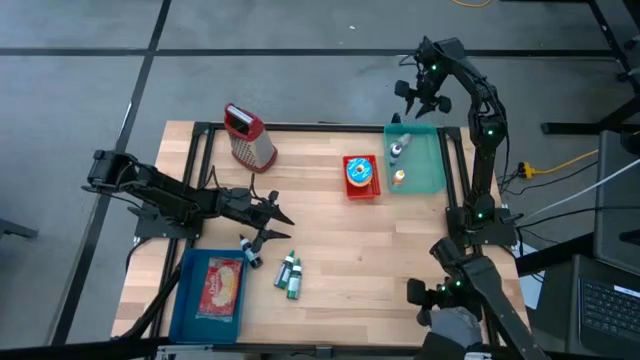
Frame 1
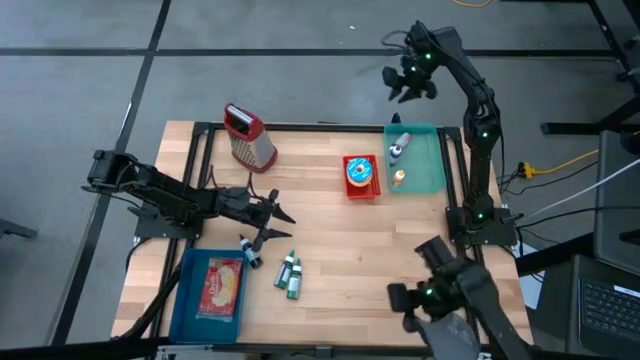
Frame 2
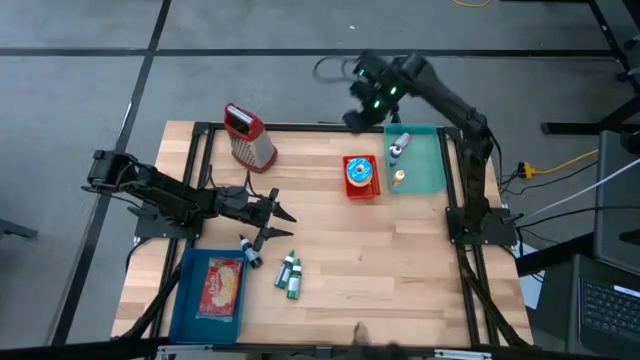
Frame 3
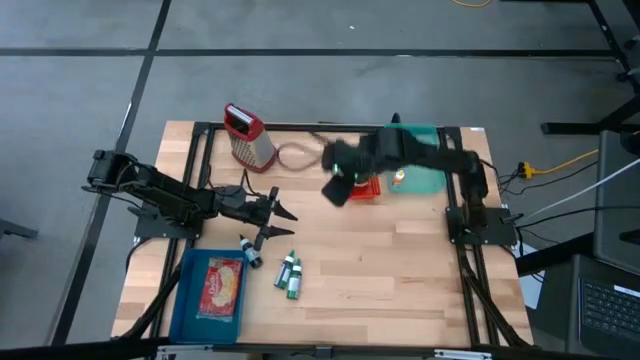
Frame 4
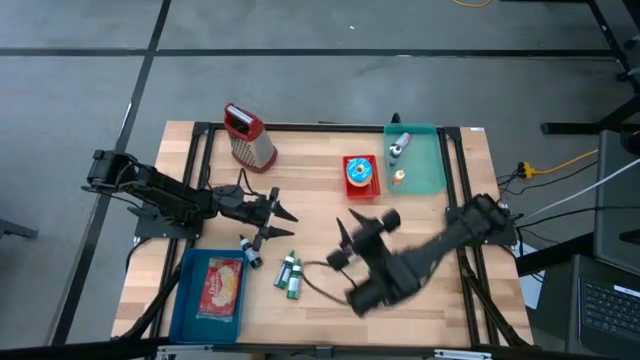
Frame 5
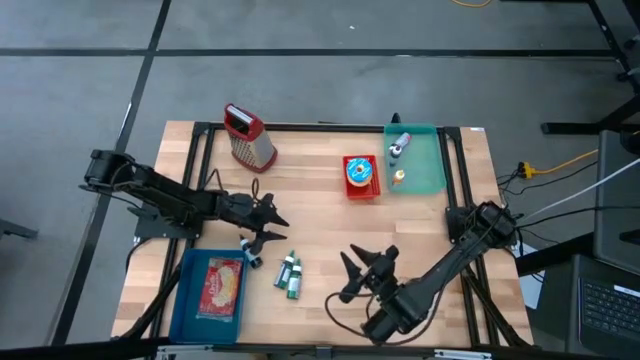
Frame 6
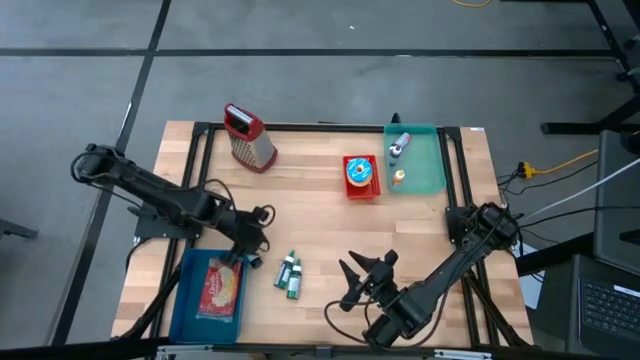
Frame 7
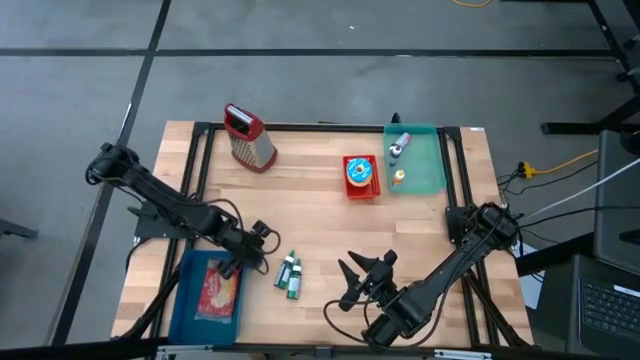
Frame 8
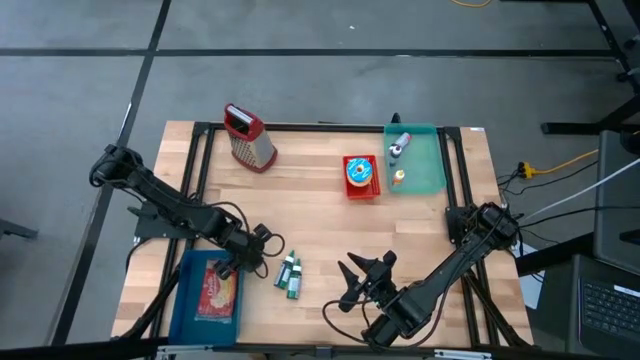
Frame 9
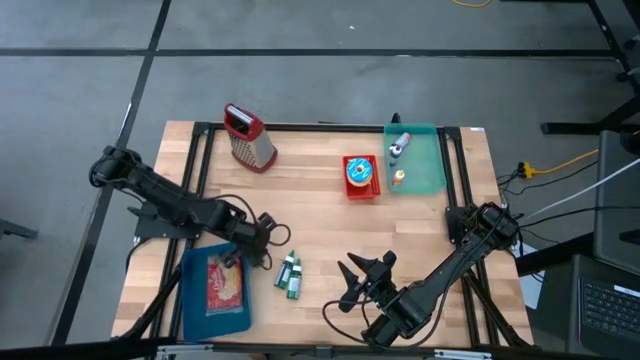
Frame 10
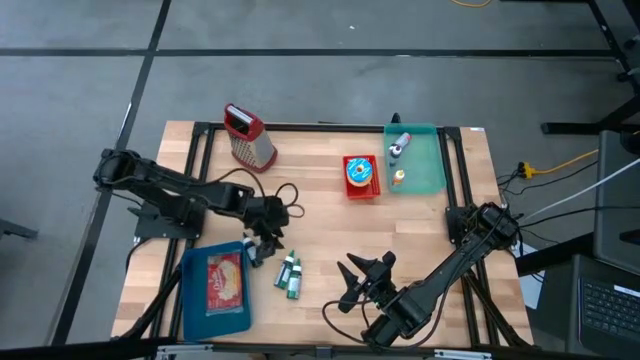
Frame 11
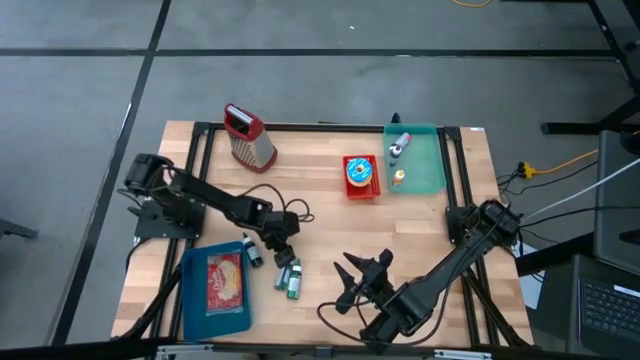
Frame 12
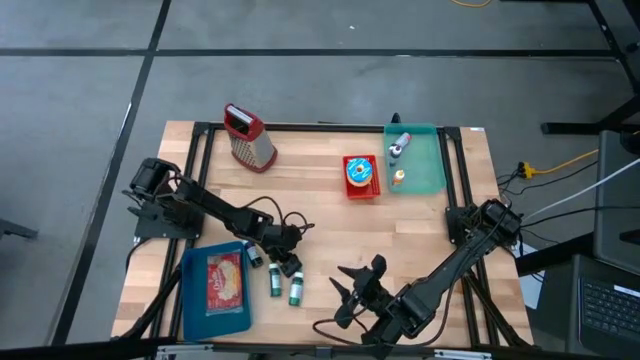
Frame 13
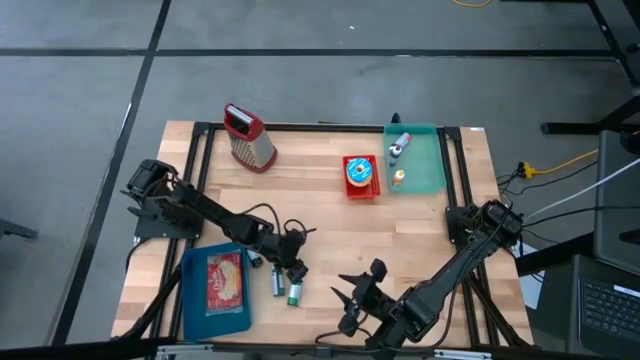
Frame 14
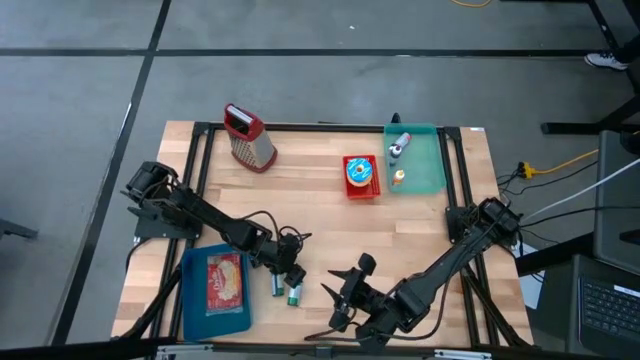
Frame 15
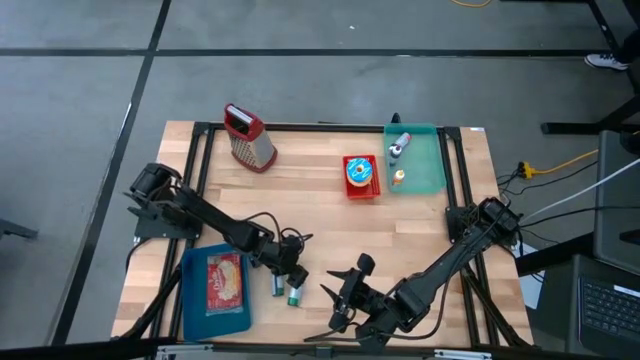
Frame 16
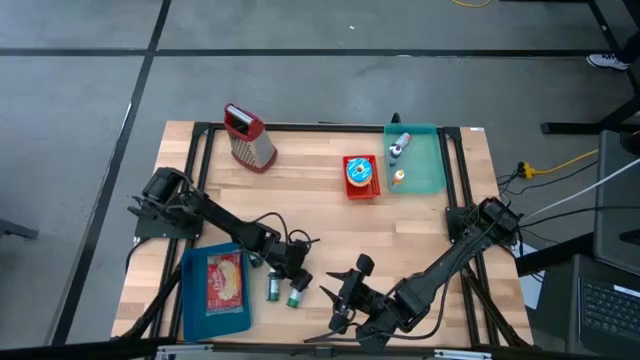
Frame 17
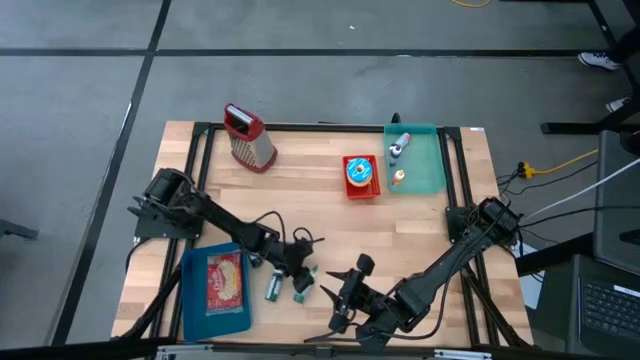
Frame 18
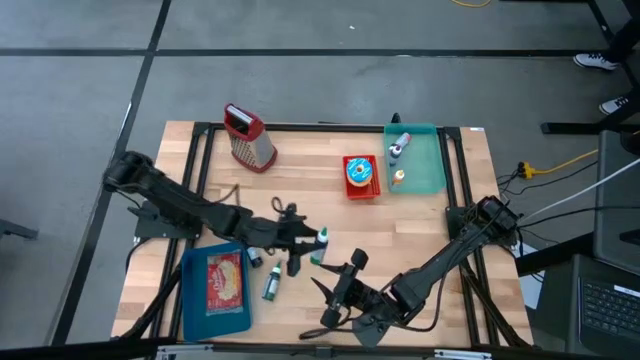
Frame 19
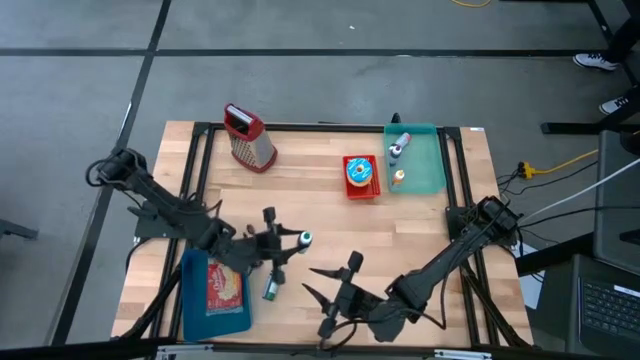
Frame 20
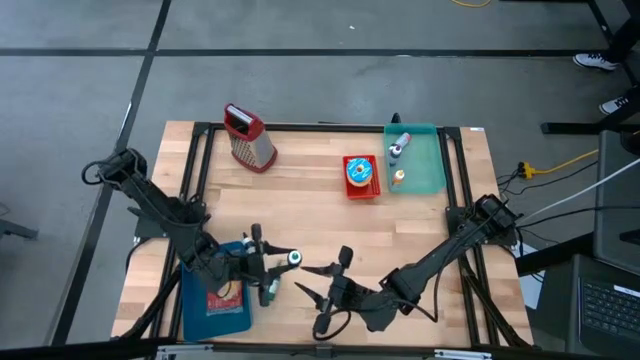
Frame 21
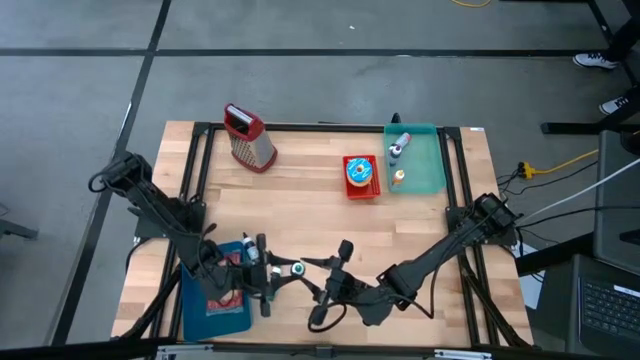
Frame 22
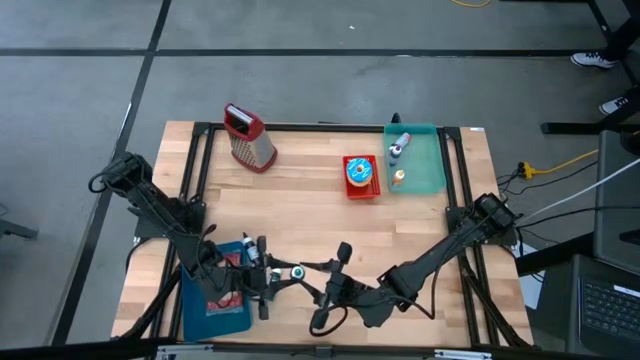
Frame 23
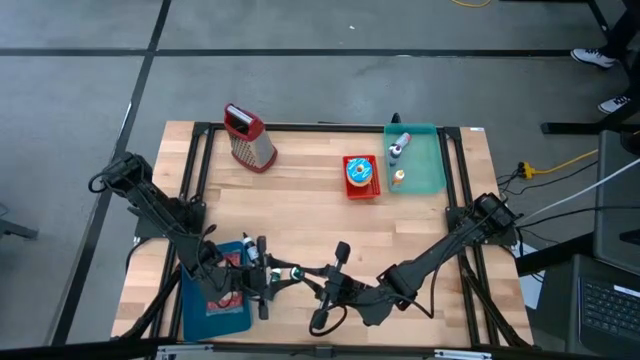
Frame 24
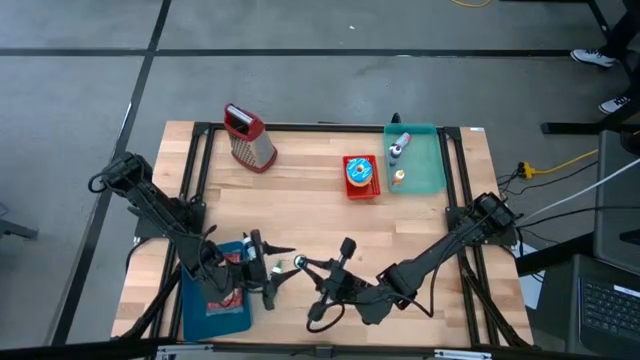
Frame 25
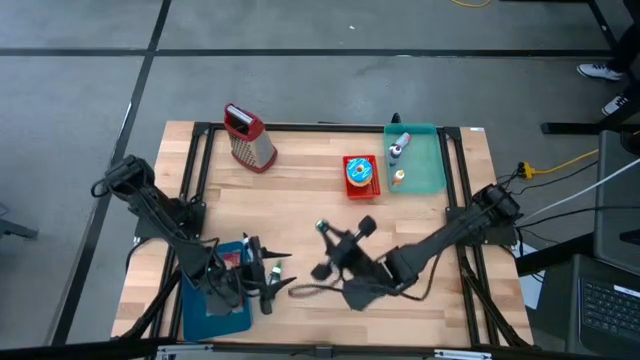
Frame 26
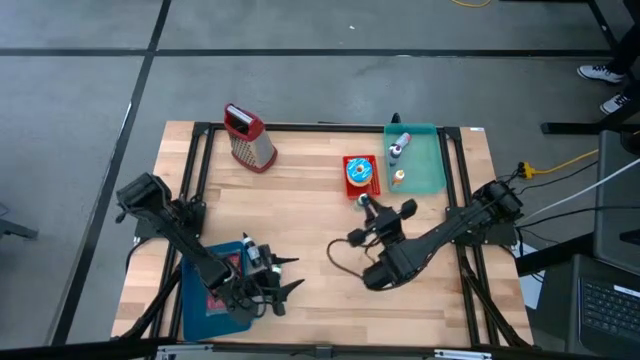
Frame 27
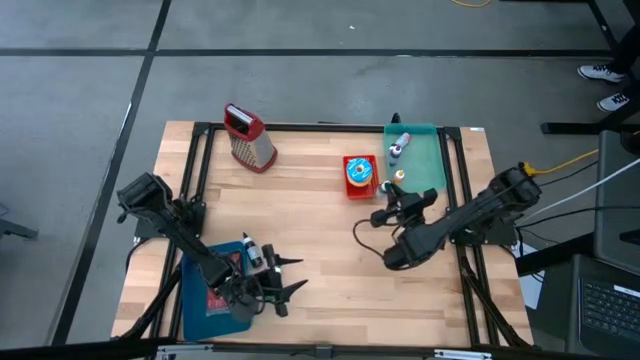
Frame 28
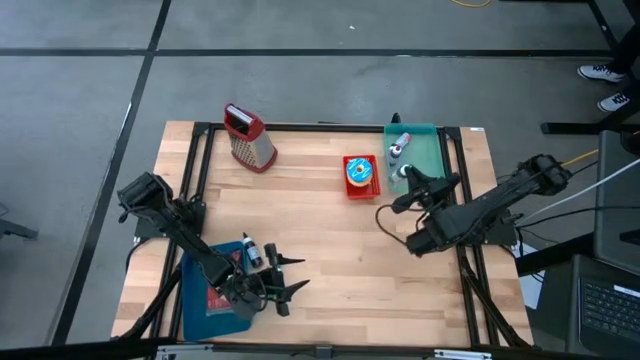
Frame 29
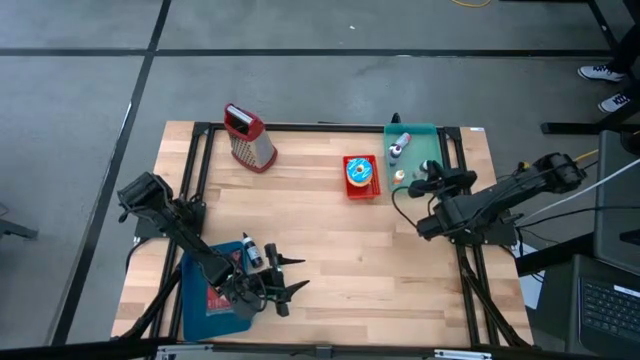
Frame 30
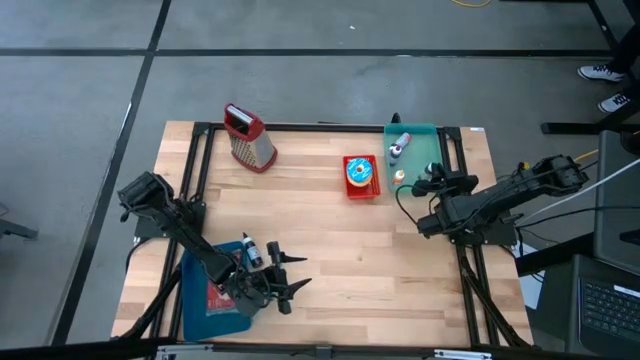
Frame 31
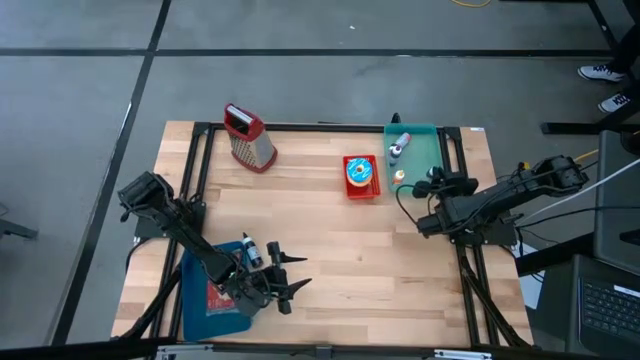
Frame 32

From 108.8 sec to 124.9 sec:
Put the right green food coloring bottle into the green bin

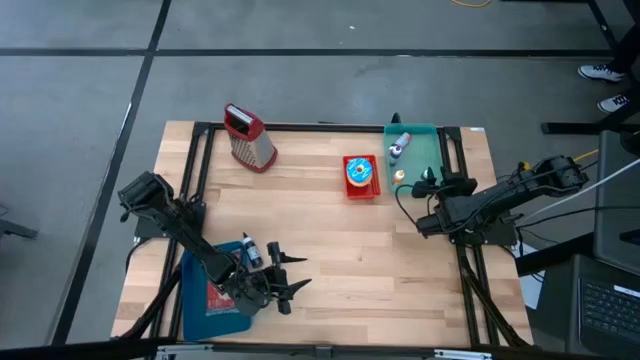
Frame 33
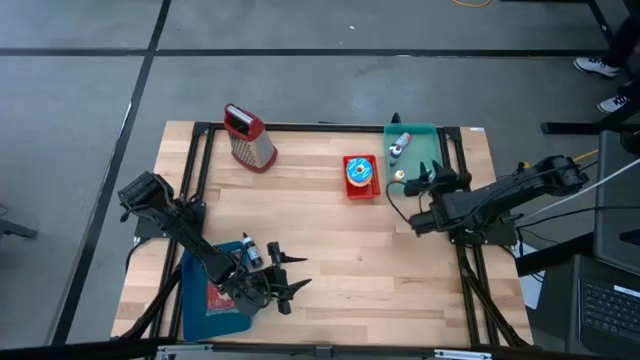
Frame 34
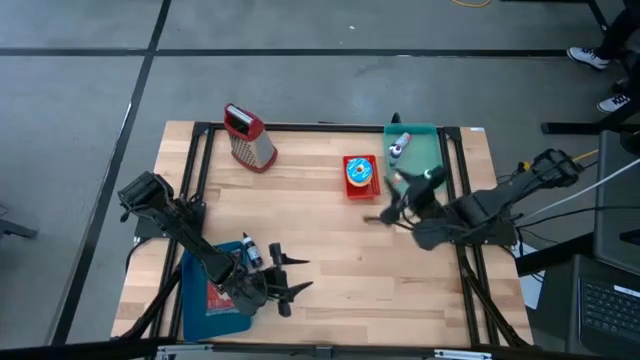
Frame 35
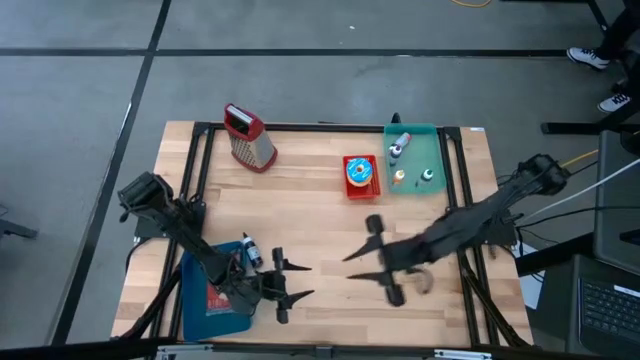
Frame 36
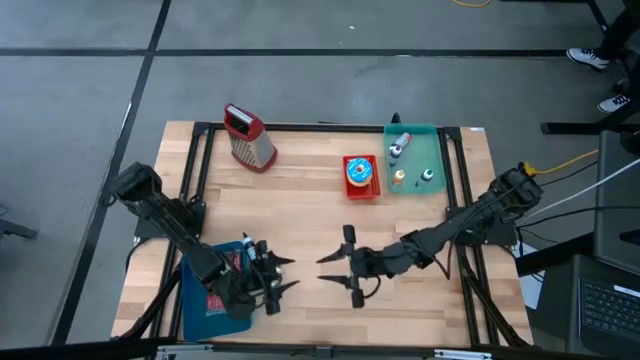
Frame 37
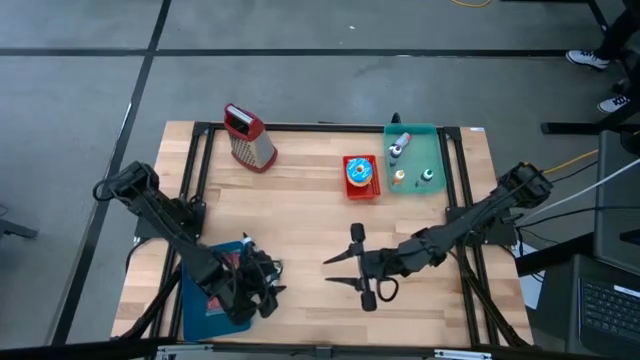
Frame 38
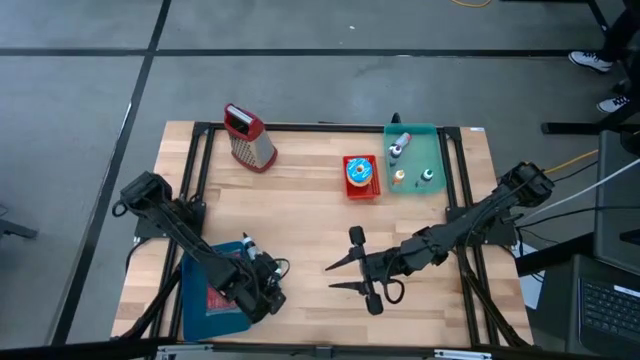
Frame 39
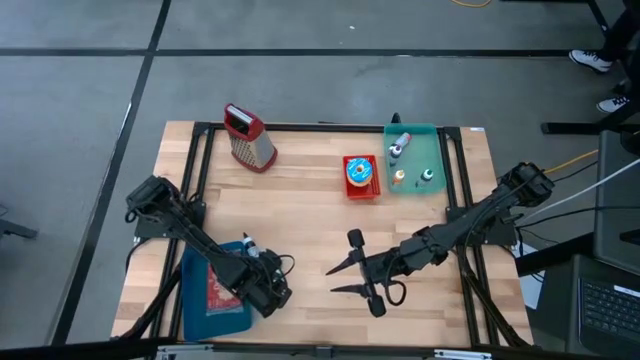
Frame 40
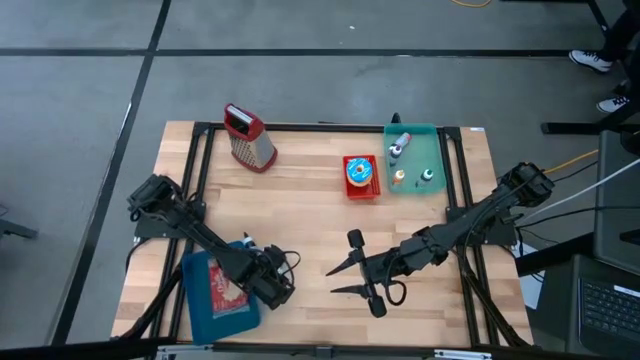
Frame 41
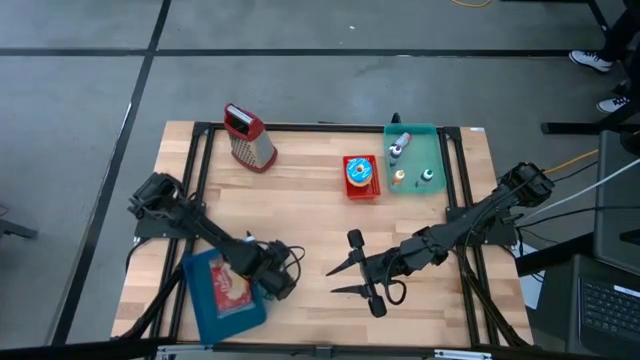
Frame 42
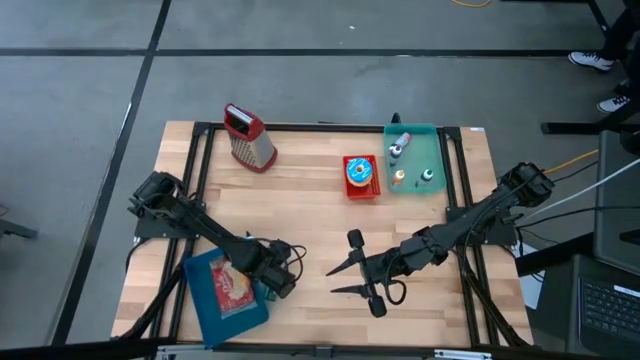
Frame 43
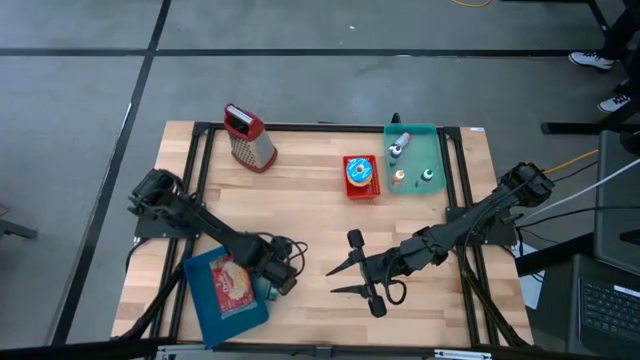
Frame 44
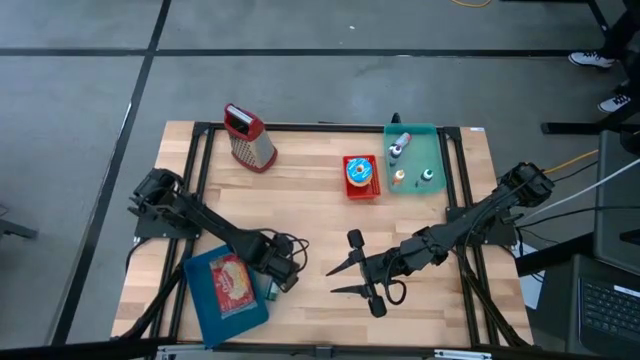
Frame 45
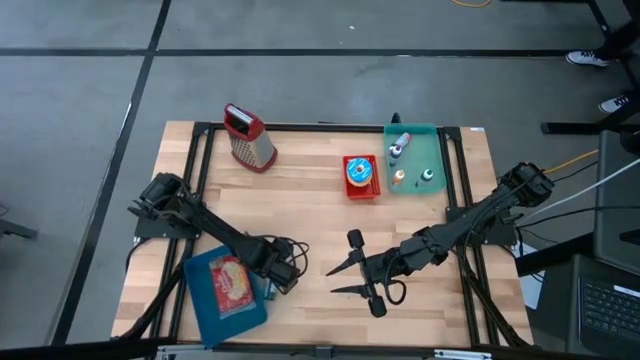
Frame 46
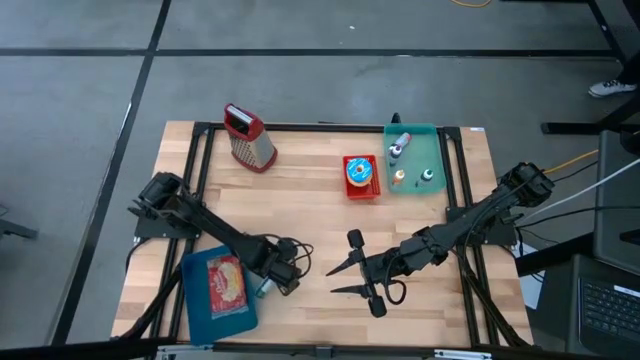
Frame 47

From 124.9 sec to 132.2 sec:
Put the green food coloring bottle into the green bin
